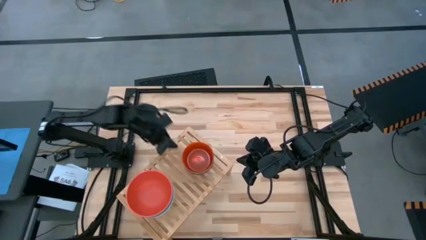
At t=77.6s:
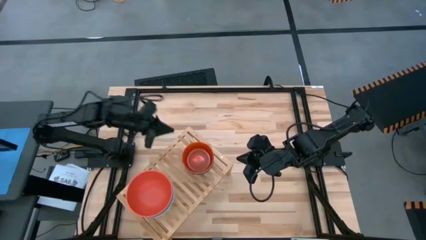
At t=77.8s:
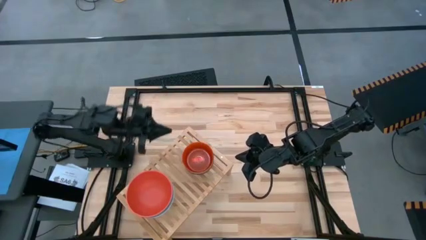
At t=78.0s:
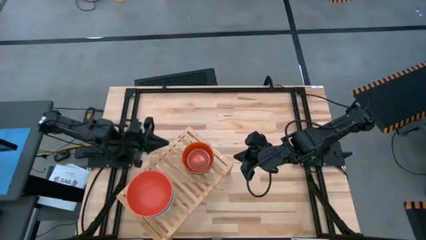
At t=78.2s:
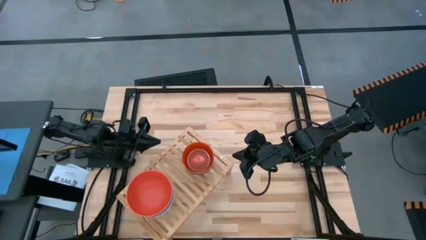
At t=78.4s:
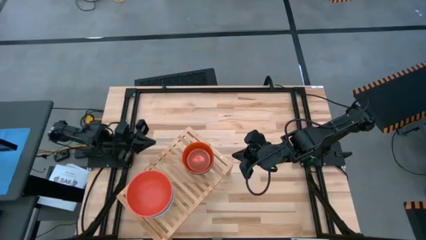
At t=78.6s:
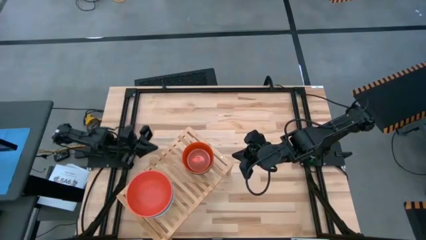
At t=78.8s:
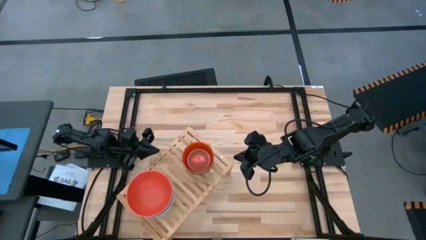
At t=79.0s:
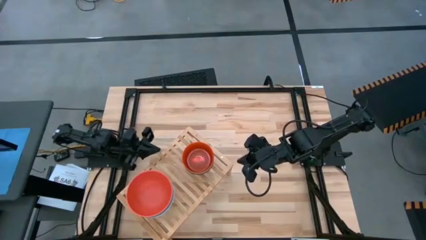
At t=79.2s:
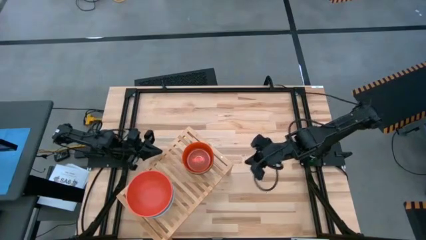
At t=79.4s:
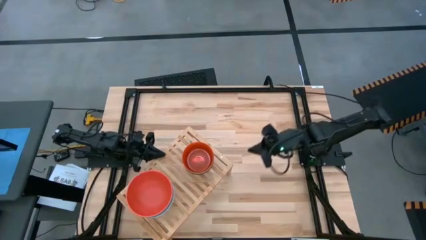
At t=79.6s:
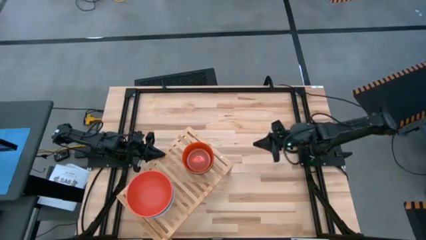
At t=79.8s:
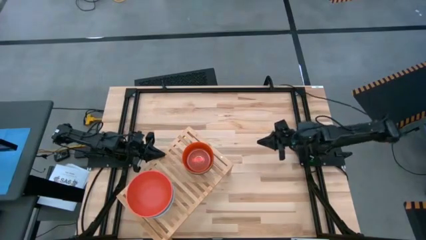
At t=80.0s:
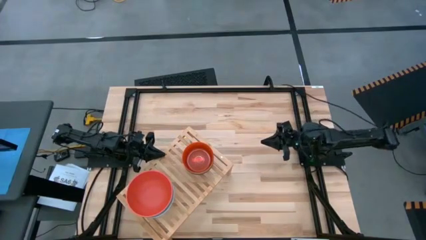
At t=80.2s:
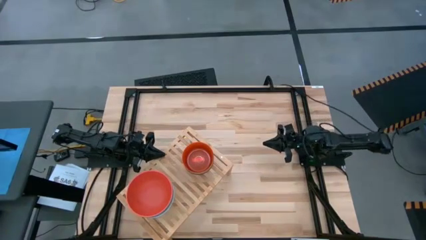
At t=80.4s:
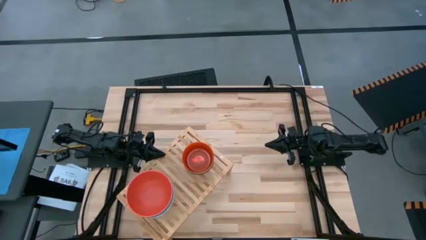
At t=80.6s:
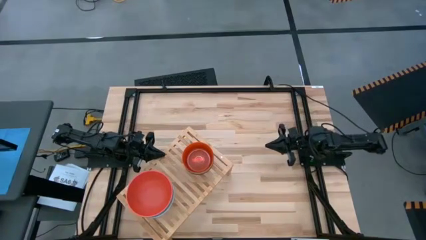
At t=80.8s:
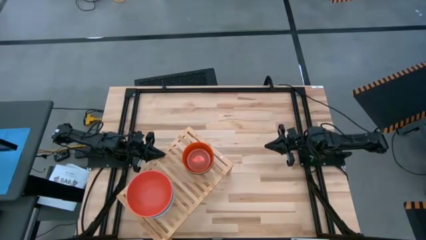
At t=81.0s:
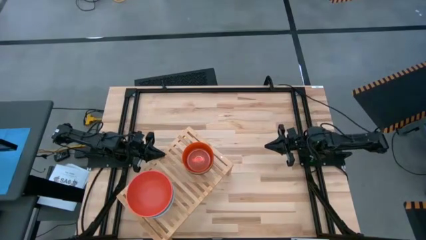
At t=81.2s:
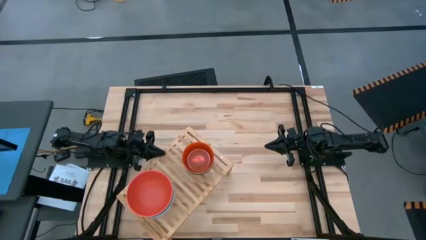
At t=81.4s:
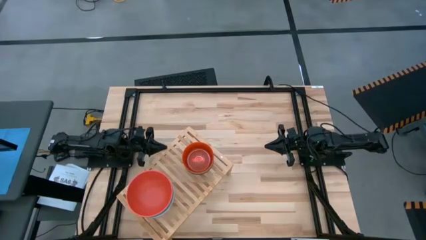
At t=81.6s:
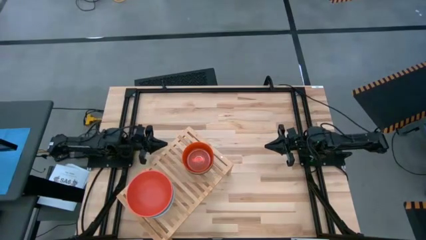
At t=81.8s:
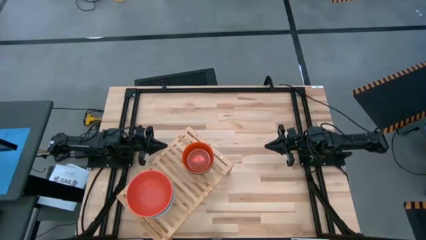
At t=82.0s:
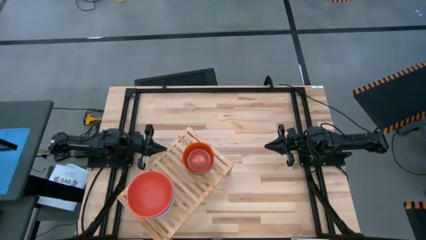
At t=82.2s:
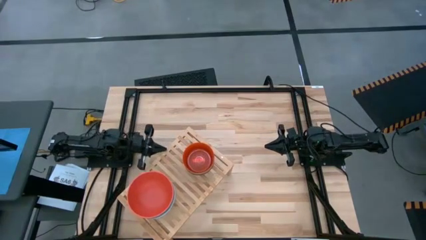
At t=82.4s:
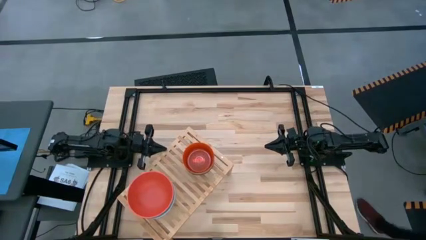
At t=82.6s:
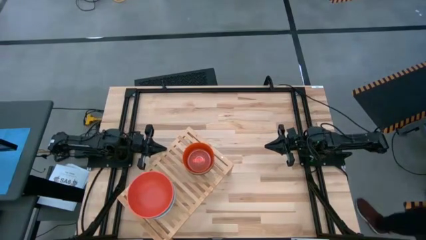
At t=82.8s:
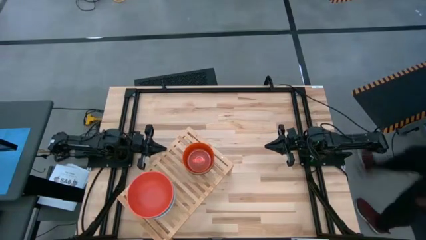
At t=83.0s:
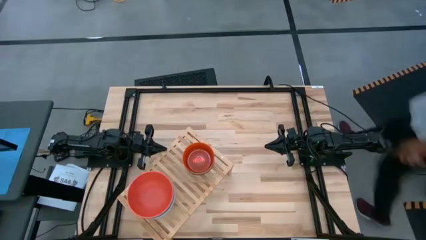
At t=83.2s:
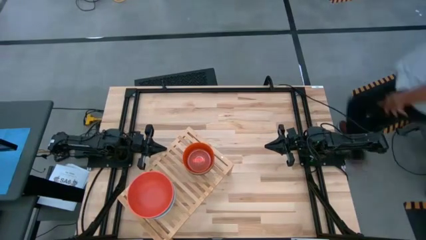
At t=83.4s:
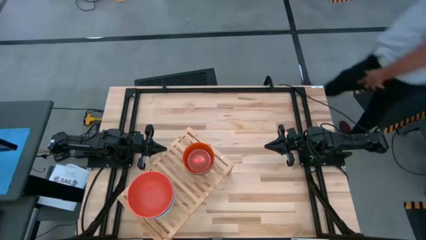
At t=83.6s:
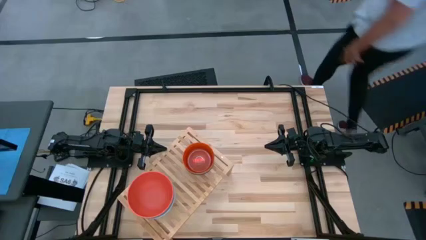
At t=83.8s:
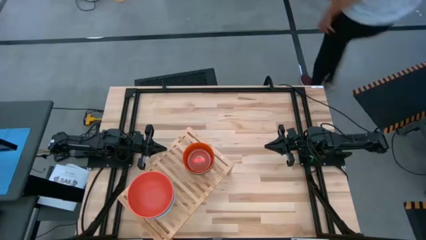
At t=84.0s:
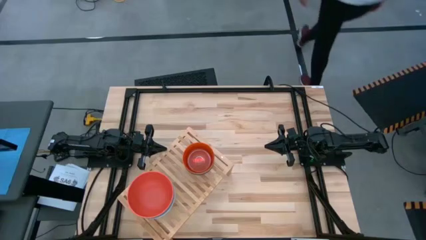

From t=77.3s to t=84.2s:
Task: Place and stack bowls onto a shelf
Return to Home Position
